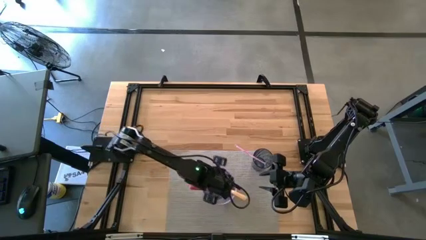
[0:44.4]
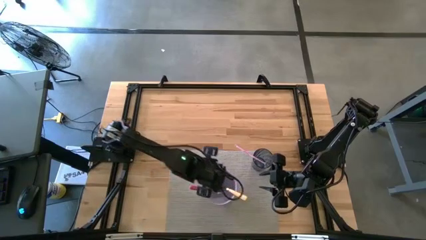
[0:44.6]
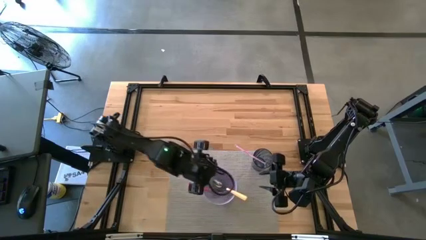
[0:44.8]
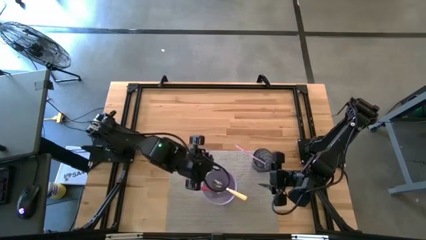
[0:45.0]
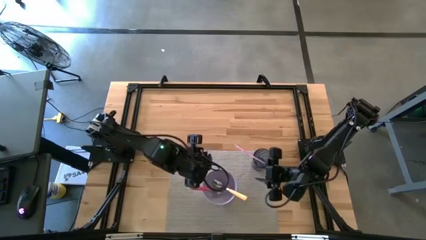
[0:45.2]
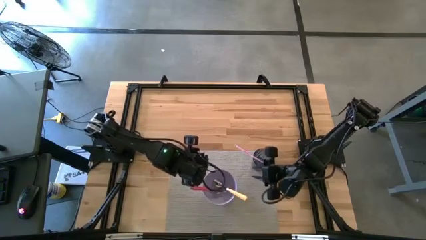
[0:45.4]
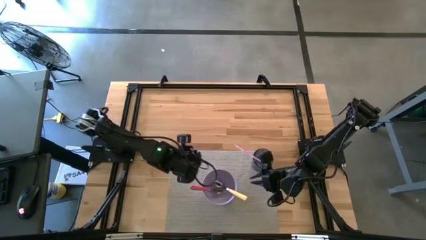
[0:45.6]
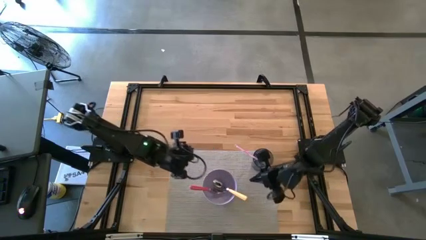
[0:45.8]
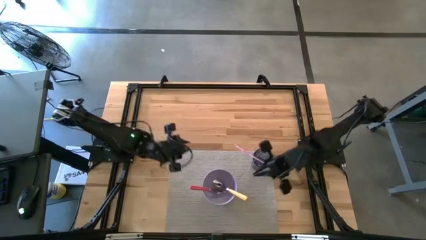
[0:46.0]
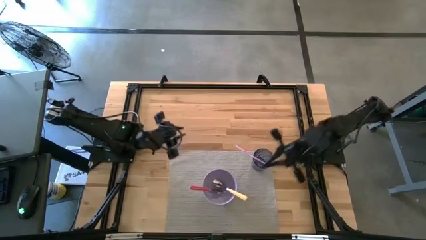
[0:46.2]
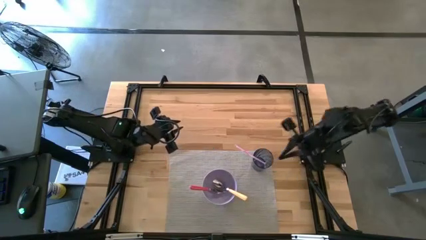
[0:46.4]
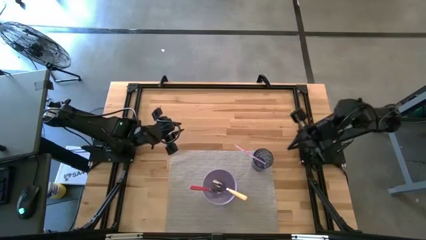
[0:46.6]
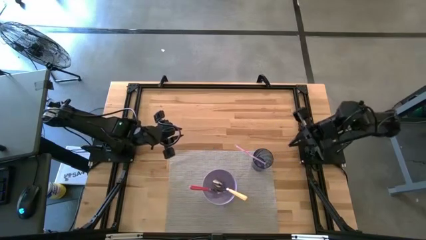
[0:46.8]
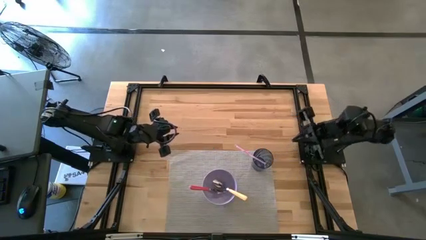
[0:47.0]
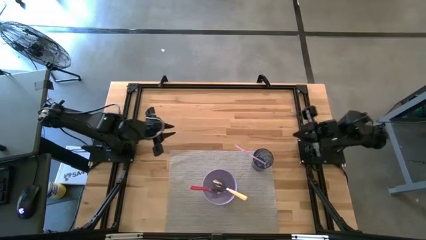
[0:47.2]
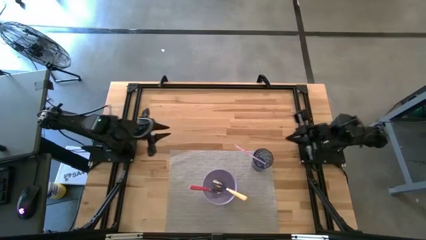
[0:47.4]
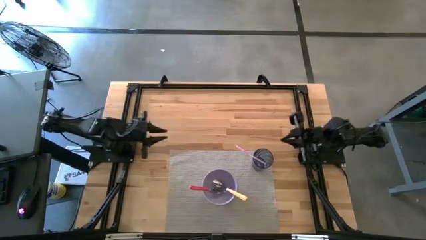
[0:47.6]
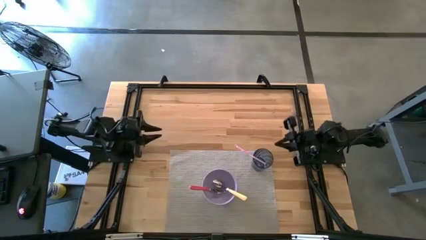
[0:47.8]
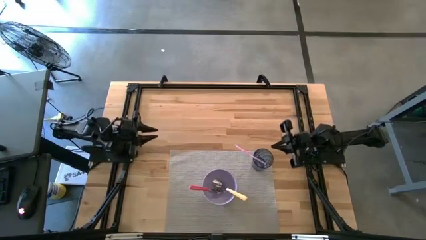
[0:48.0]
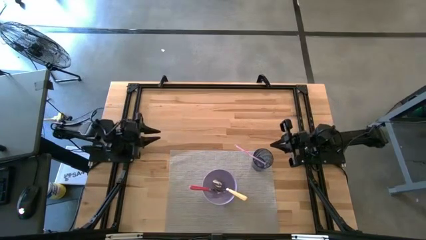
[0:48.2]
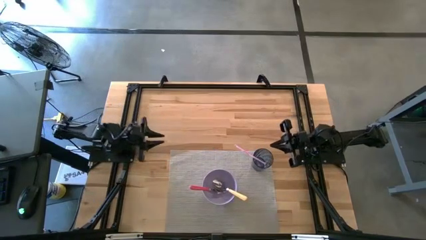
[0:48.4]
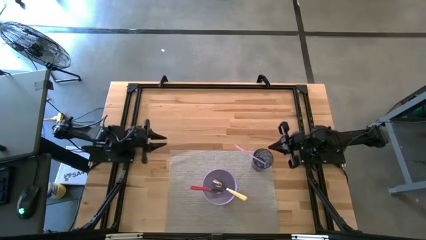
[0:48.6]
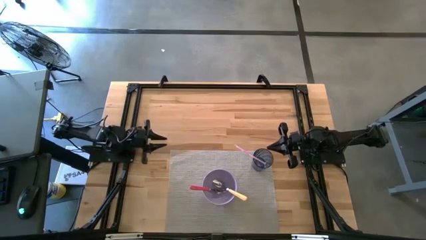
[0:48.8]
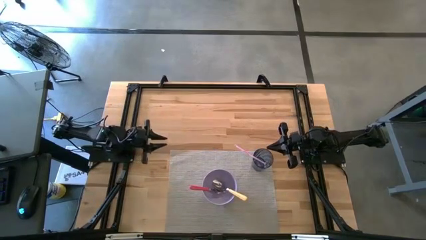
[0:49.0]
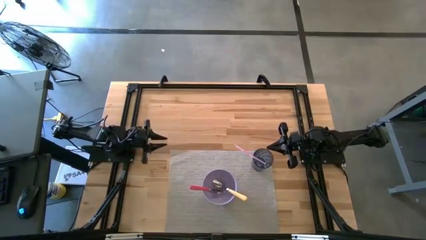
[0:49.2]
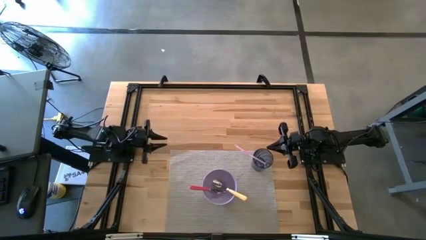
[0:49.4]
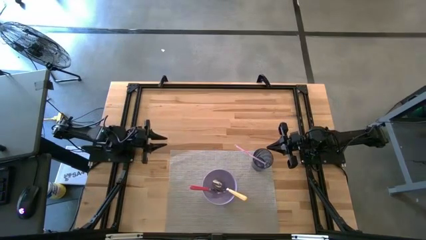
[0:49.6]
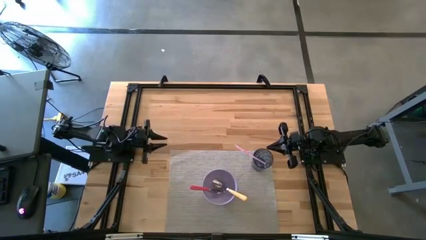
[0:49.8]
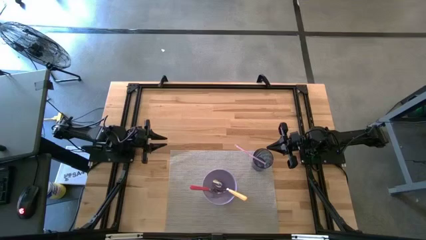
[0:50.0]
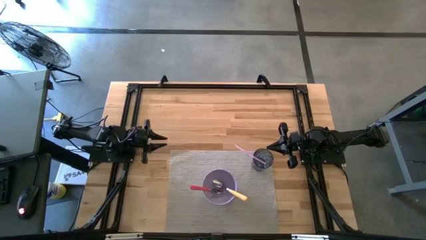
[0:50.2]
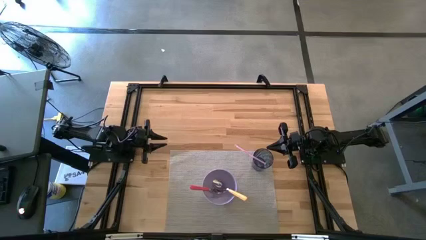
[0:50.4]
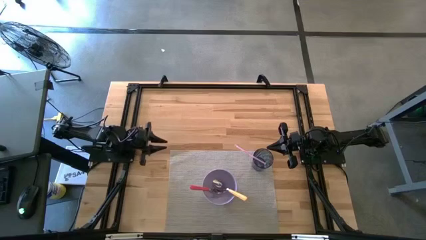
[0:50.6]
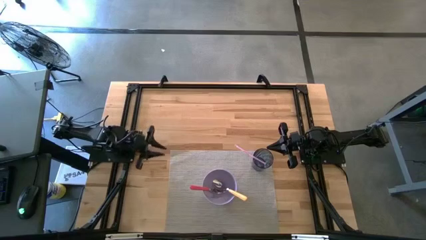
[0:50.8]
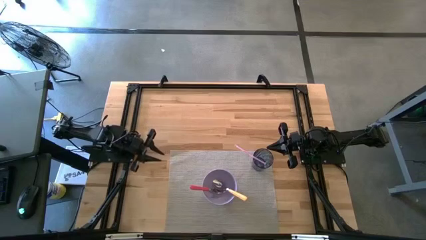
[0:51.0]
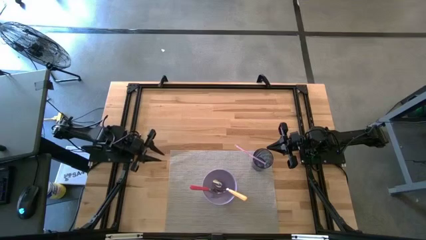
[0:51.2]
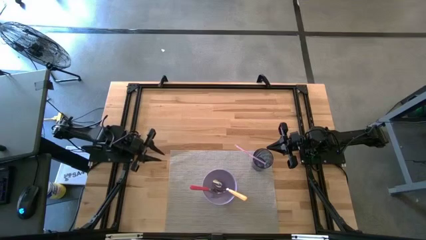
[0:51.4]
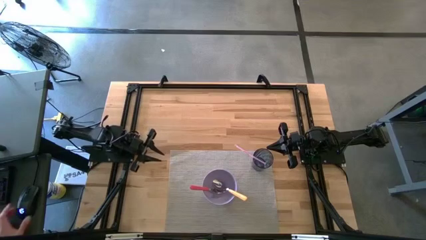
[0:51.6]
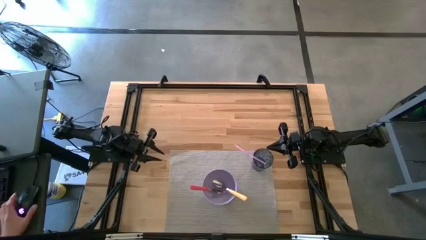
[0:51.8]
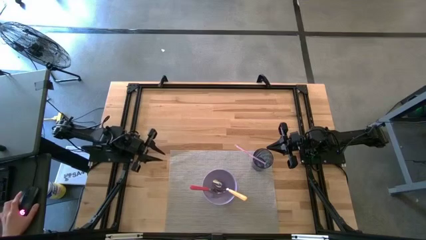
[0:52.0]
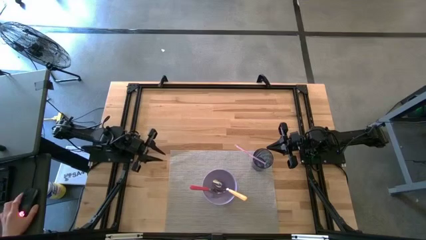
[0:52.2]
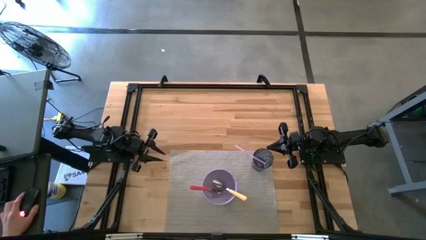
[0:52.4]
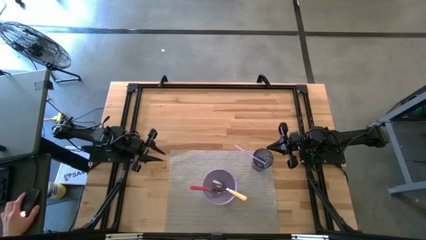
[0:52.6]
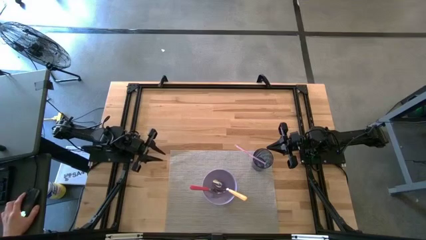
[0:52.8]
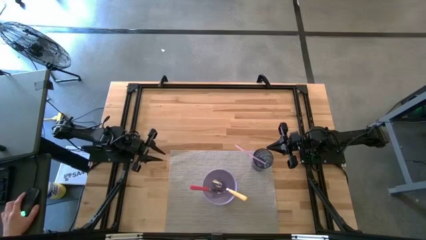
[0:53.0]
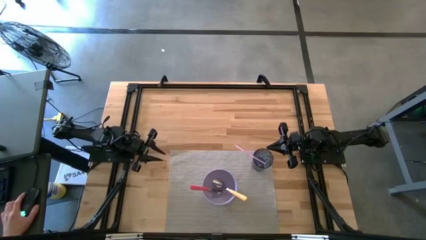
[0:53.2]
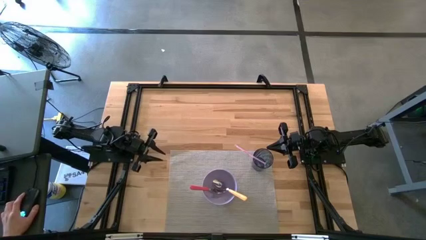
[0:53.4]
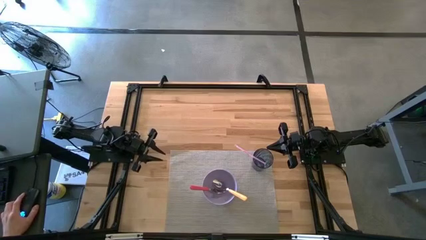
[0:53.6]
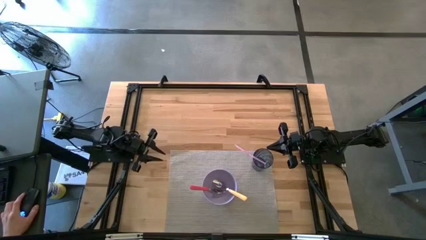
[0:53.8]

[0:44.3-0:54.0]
Task: Pick & Place Utensil
Return to Home Position

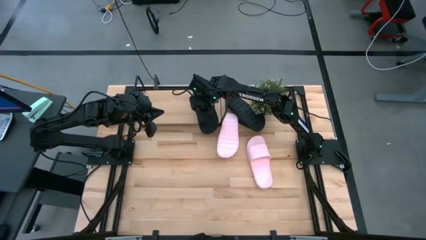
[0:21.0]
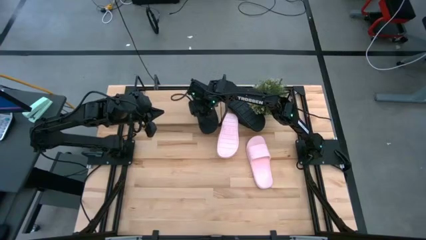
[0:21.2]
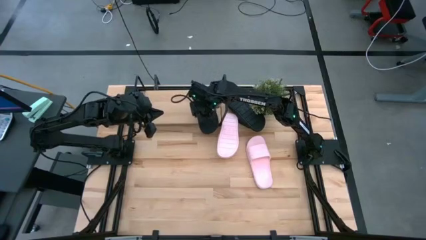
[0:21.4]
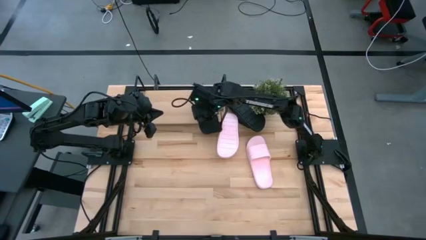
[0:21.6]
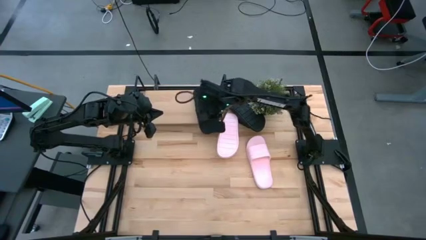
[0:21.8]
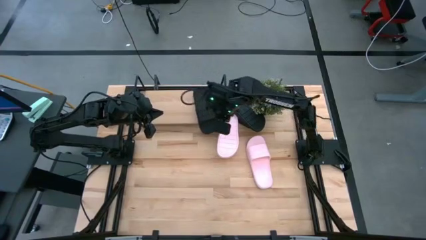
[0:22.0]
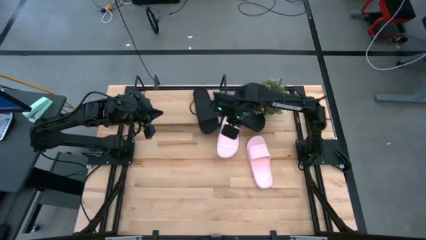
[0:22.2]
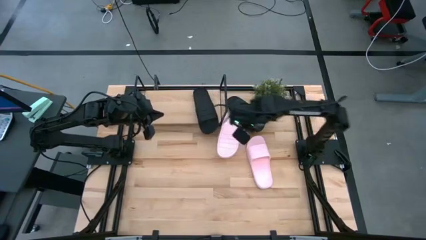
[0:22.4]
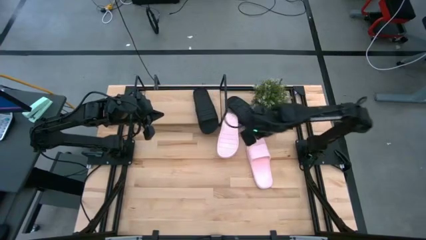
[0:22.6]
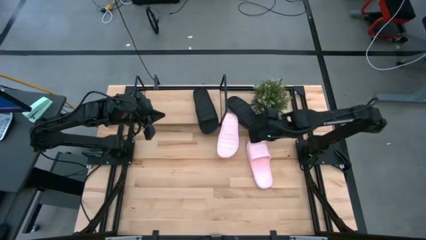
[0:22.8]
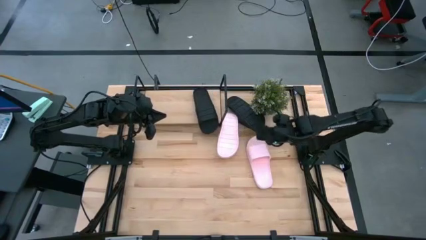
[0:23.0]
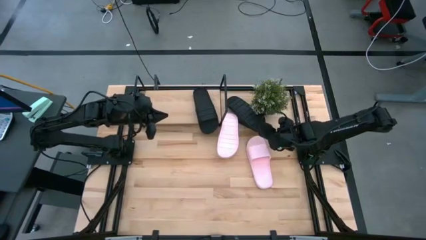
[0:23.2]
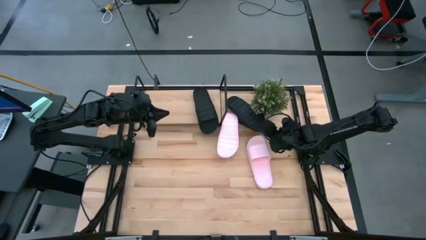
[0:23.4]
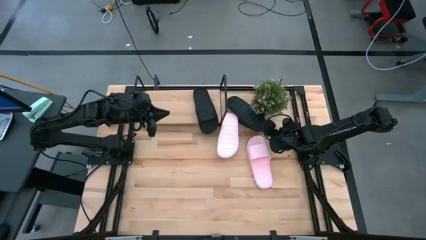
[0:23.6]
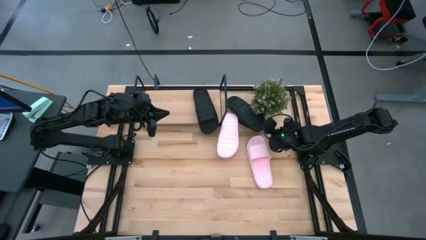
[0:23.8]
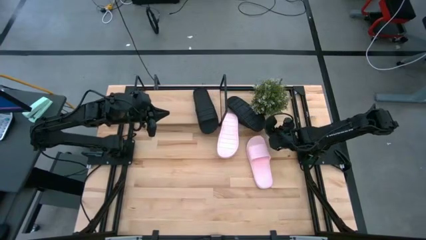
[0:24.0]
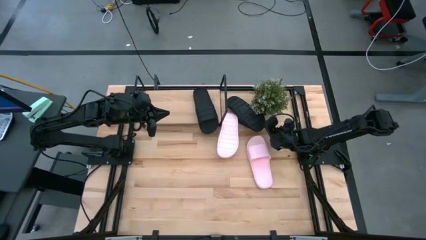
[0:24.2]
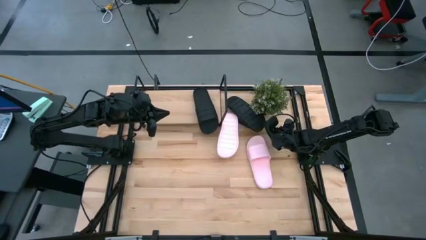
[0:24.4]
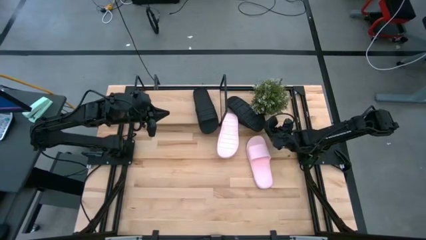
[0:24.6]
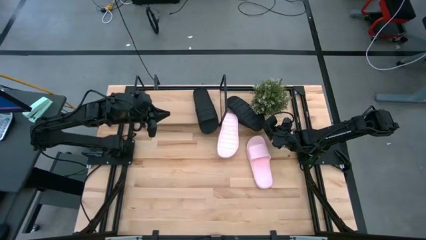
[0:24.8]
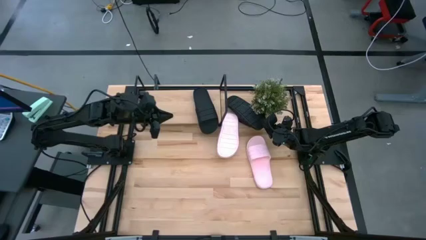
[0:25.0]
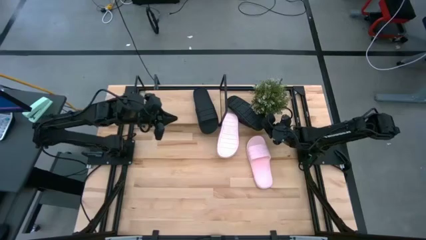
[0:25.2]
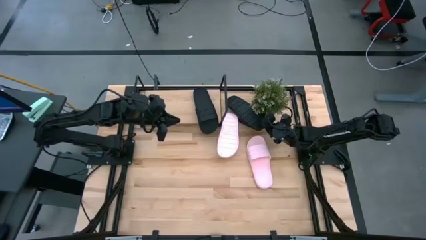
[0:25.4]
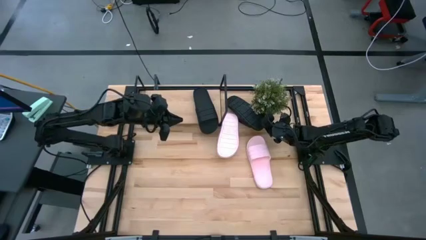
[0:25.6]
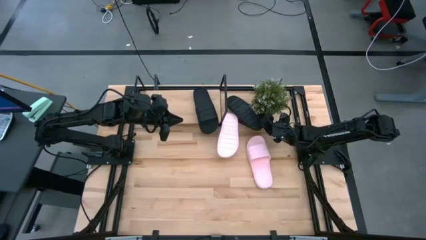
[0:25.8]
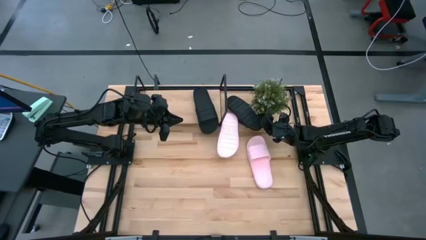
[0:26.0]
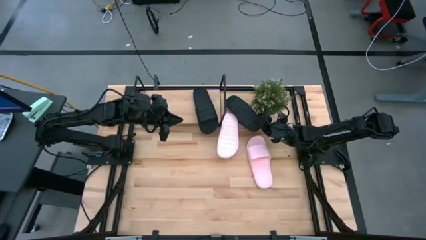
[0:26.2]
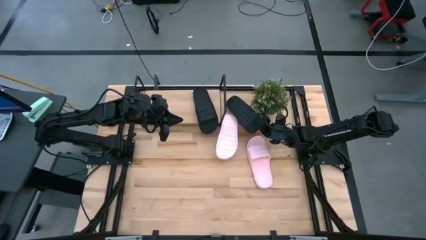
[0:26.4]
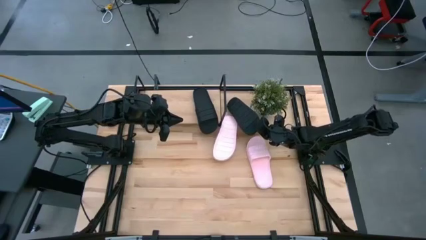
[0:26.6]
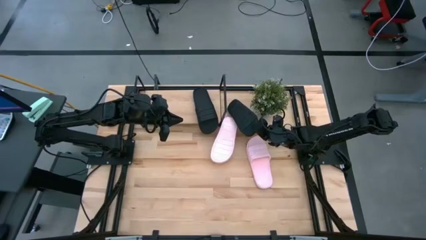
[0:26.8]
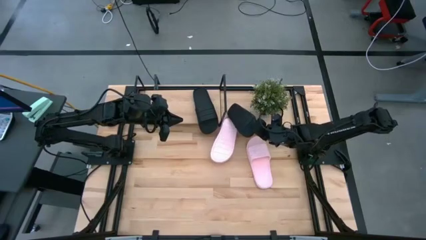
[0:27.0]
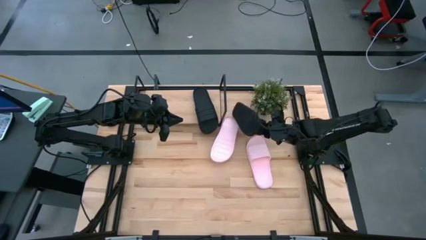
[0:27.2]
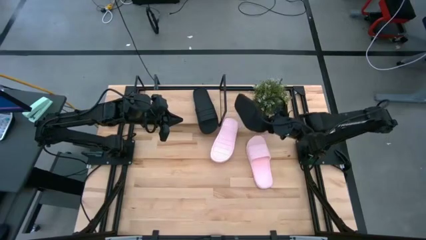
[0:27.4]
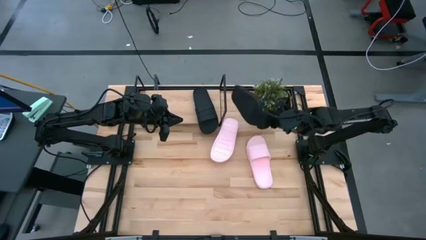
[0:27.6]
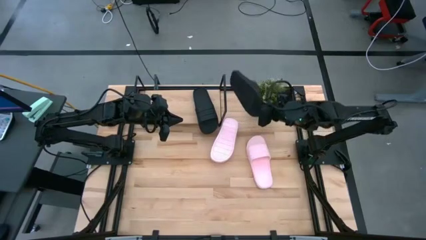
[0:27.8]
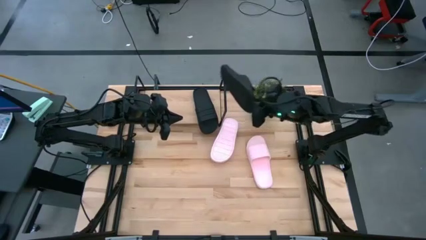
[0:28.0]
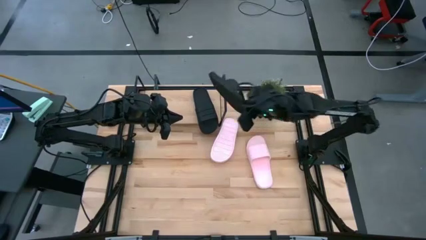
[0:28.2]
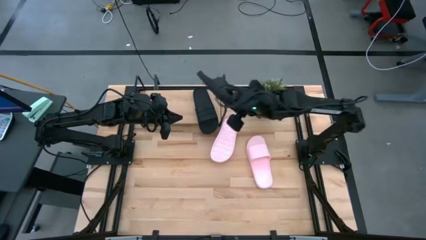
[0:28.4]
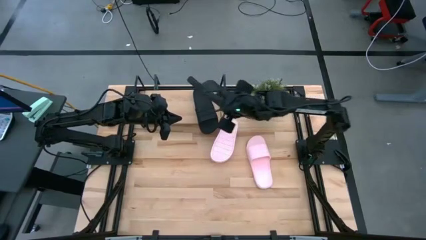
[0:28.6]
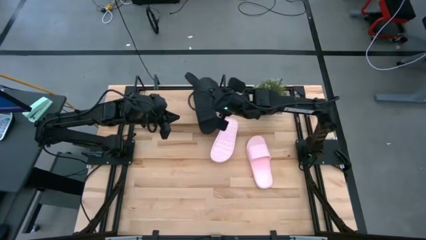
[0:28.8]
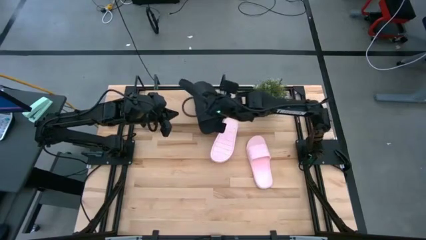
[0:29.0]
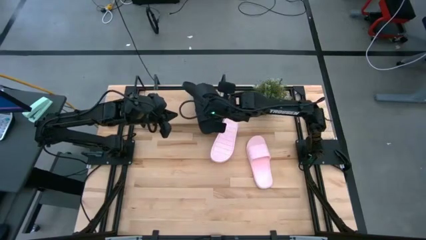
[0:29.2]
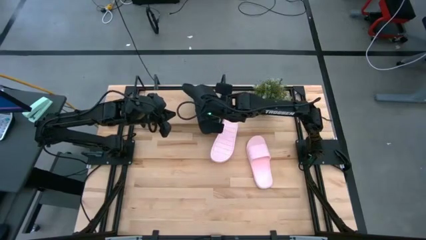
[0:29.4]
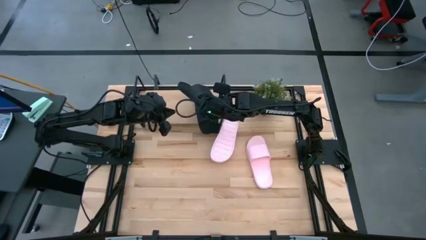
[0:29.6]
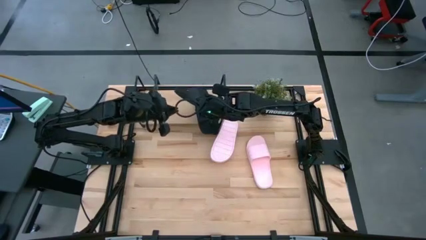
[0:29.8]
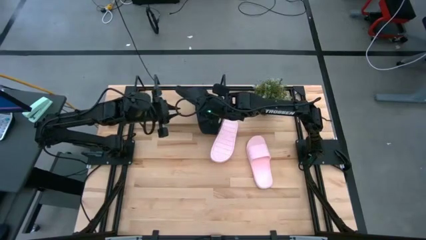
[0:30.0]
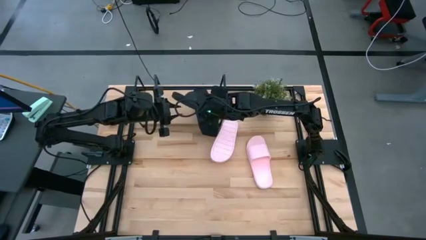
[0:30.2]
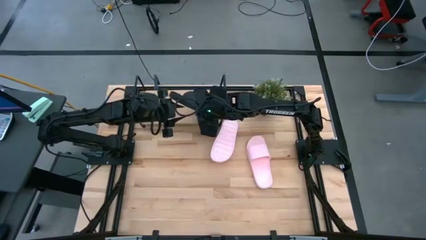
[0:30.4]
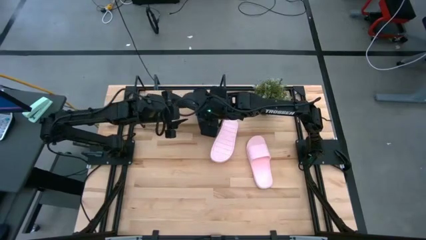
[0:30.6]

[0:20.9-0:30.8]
Task: Pick and place slides into the shelf
Put the black slipper onto the shelf
